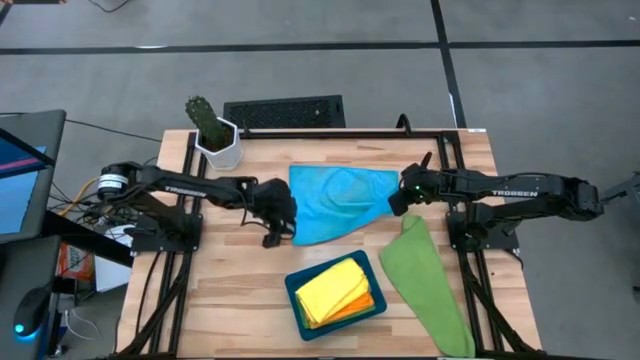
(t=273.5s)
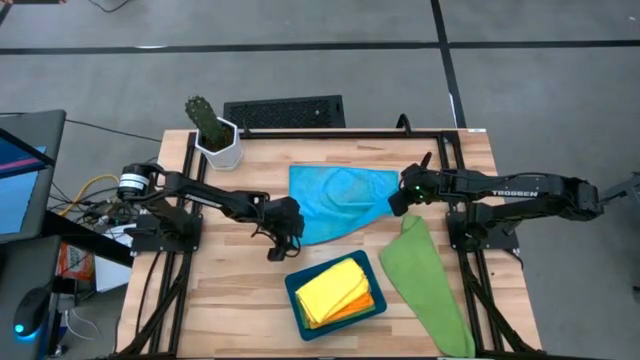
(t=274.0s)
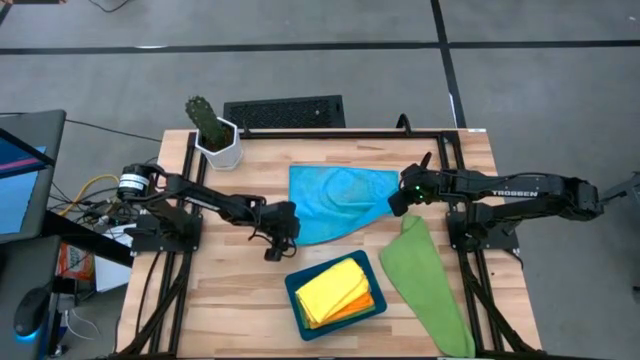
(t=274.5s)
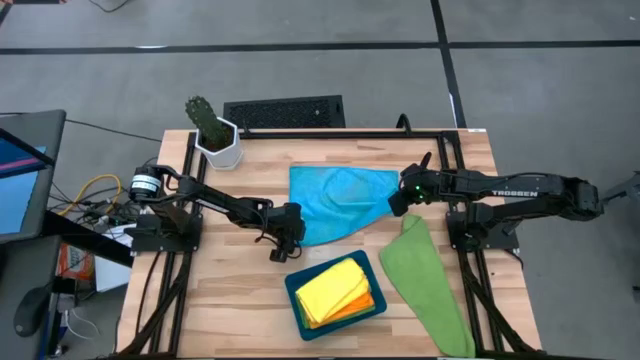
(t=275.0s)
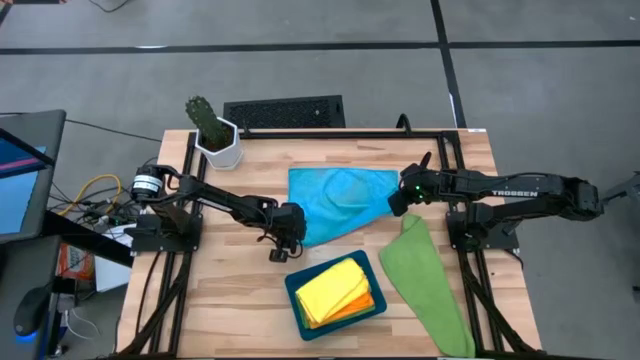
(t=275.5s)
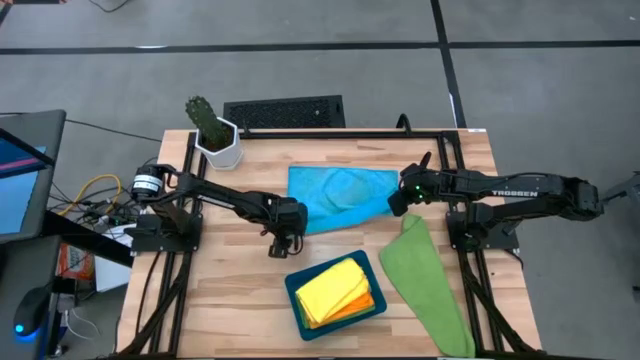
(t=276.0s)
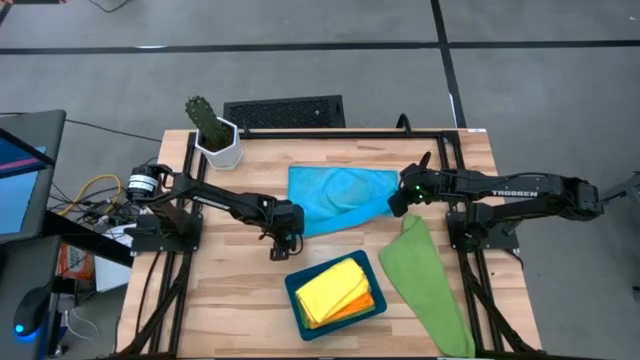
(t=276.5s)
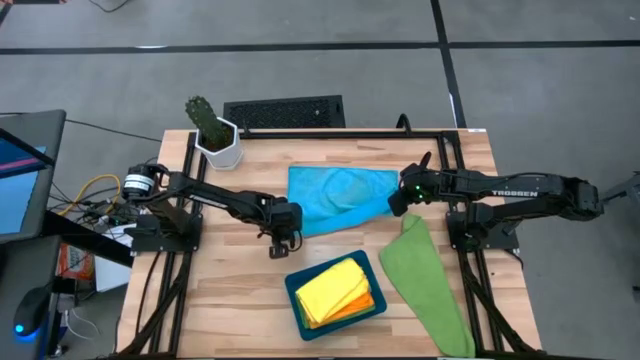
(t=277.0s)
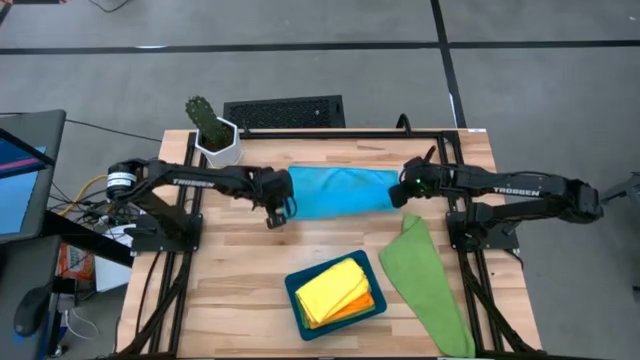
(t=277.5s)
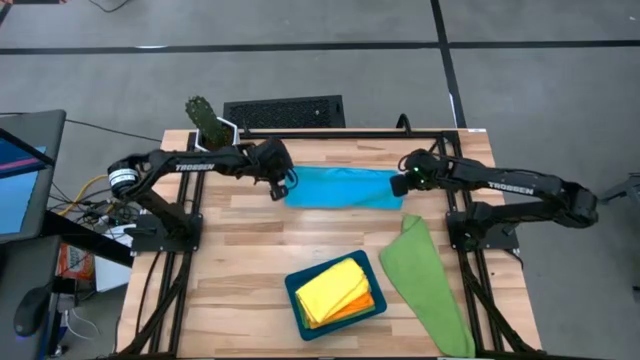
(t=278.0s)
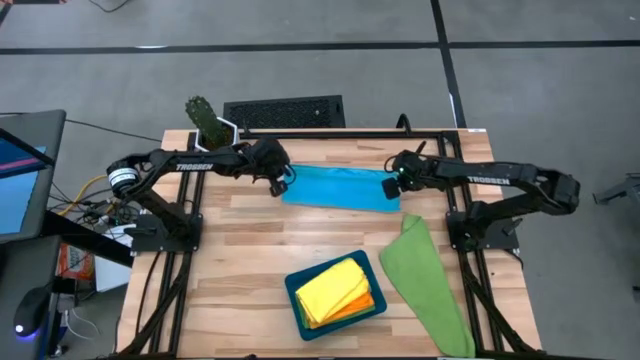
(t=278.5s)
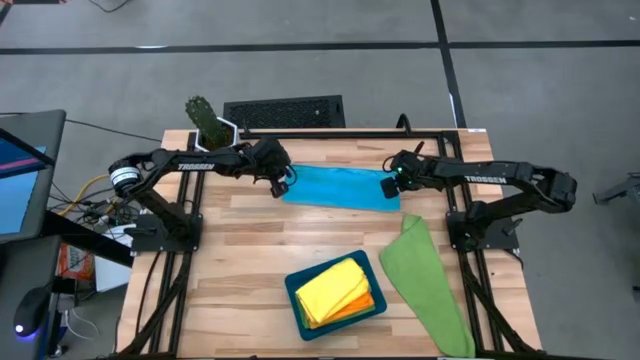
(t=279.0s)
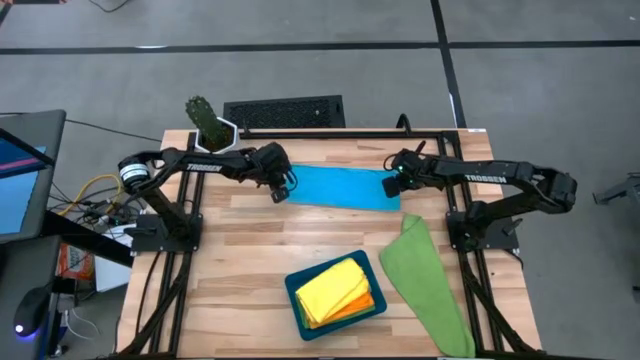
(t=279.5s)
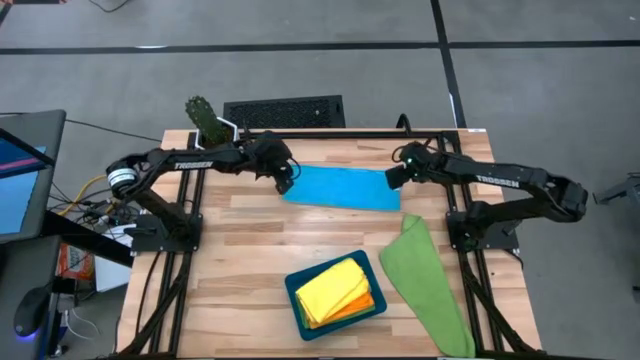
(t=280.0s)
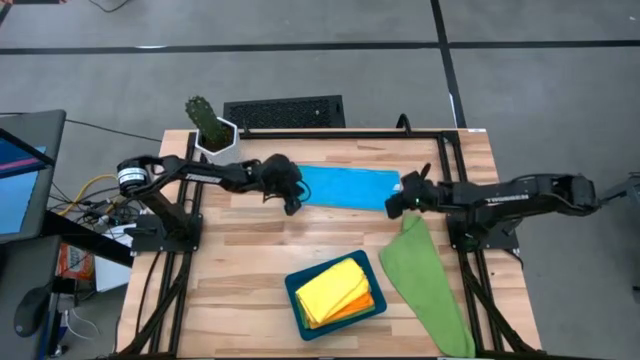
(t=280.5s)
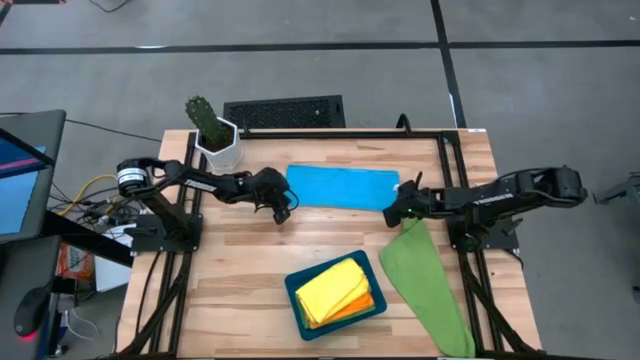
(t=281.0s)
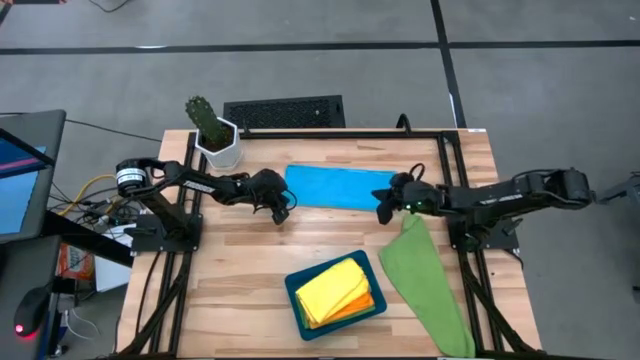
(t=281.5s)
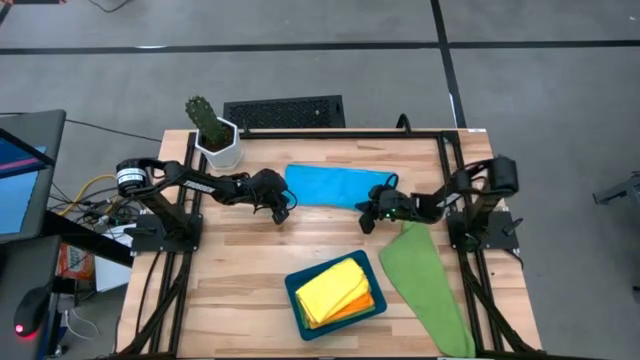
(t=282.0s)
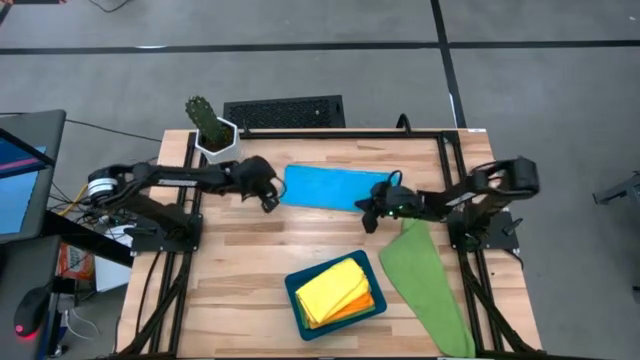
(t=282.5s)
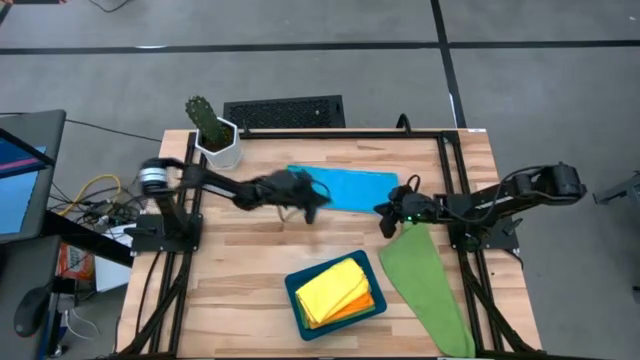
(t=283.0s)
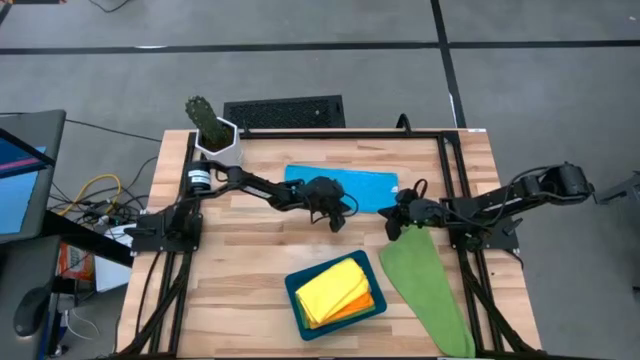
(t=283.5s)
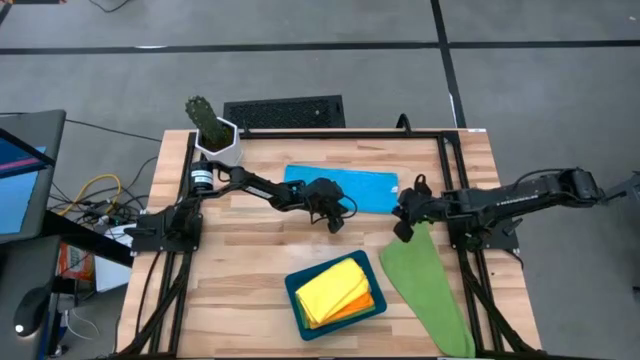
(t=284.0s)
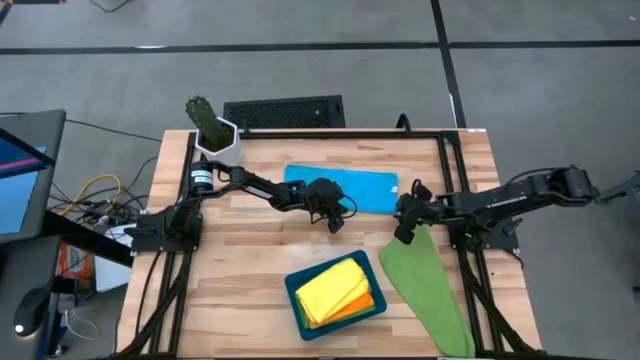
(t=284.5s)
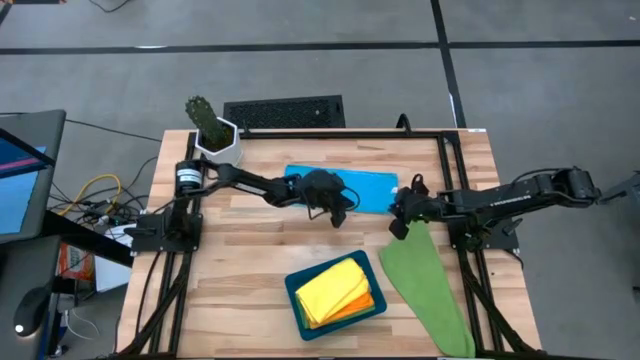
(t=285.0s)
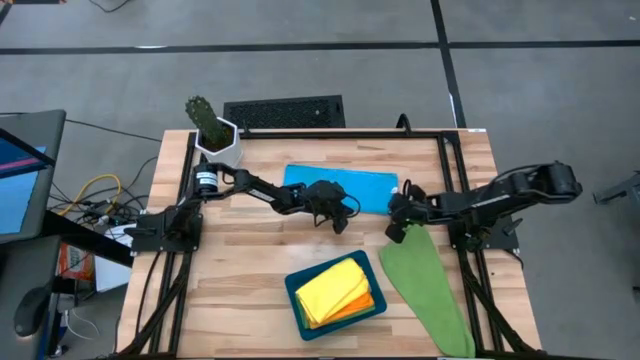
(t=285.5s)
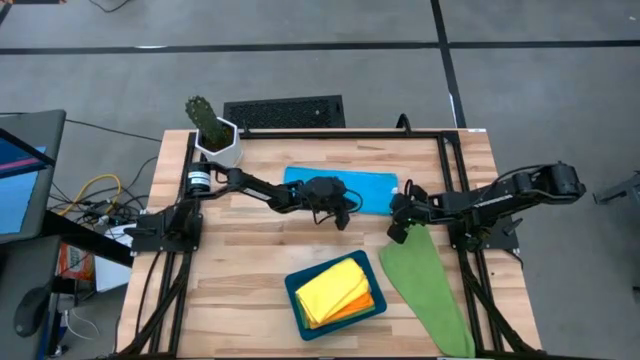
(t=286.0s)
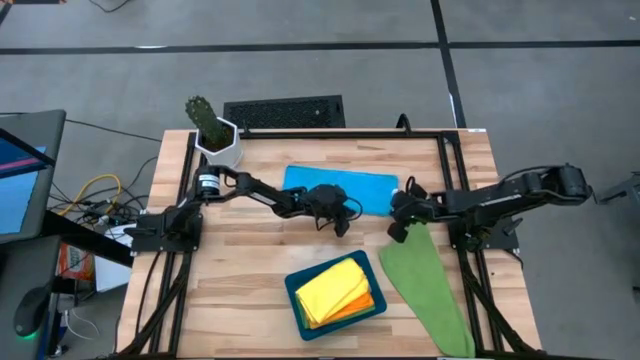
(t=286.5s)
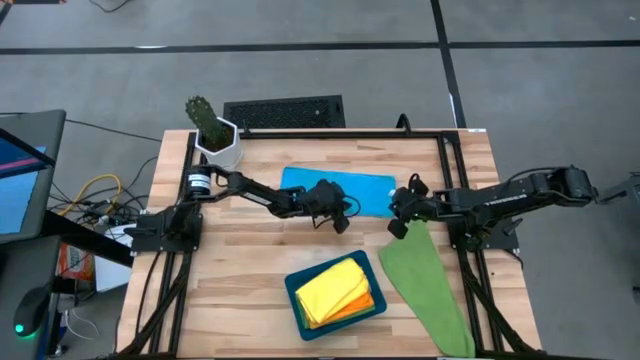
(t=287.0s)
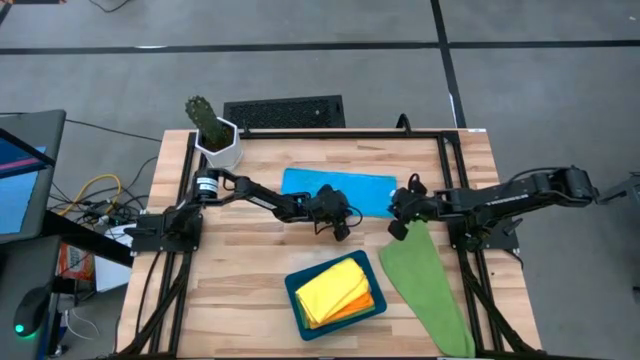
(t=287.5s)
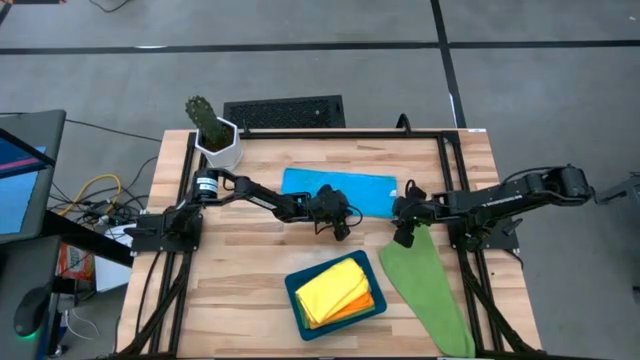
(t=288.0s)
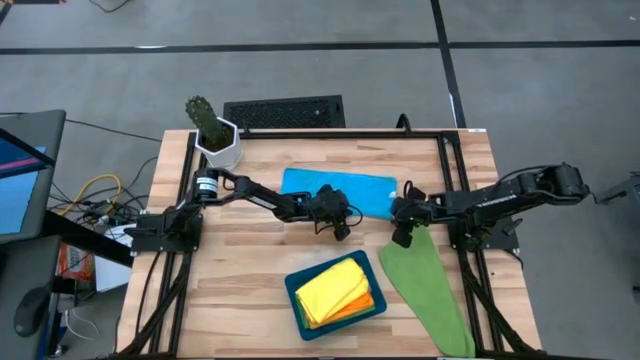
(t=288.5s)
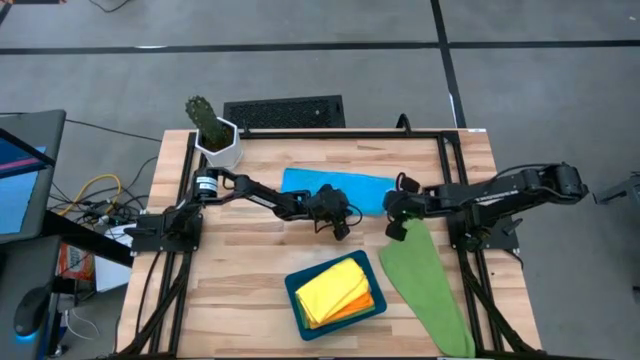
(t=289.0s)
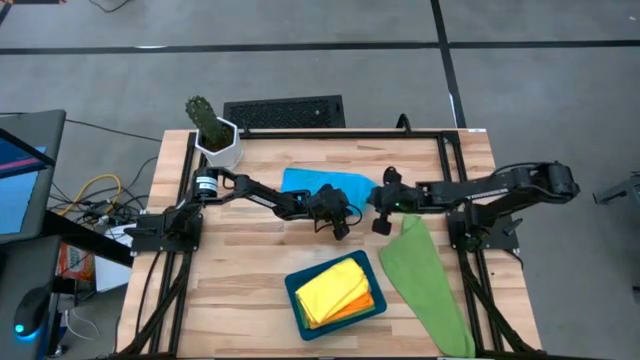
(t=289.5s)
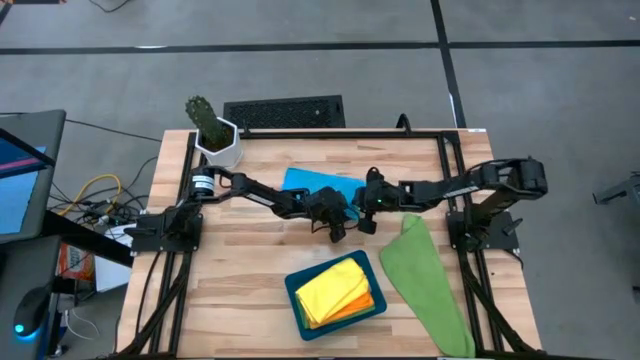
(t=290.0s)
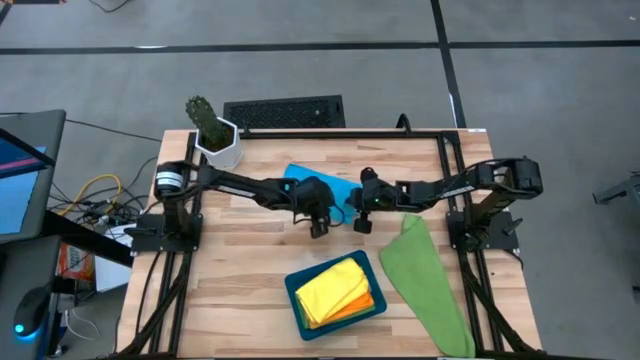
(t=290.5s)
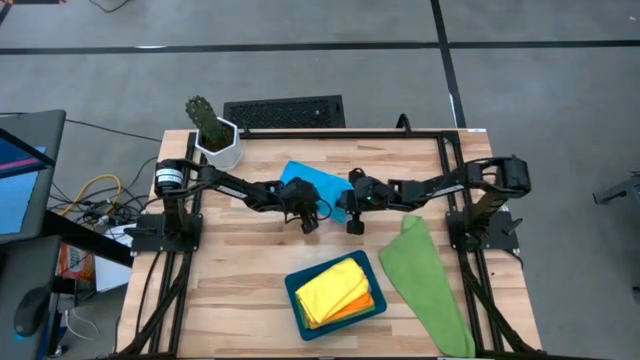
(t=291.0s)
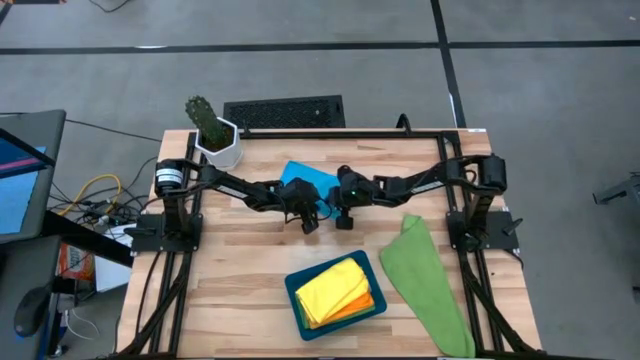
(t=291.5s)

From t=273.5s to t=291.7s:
Task: Fold microfiber towels
Fold the blue microfiber towel
